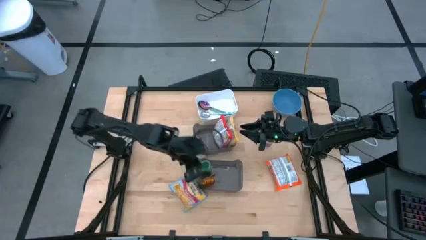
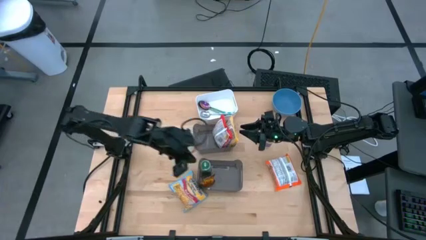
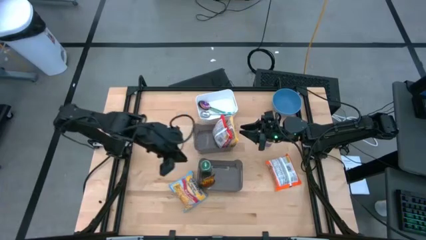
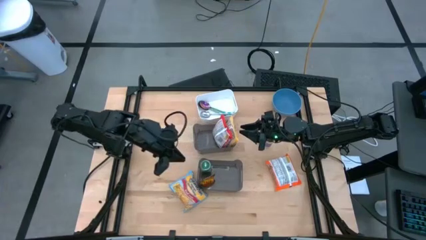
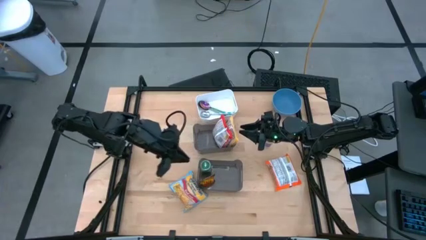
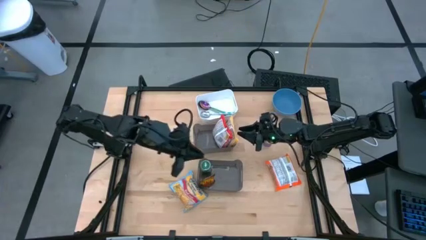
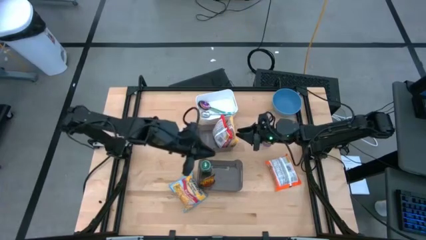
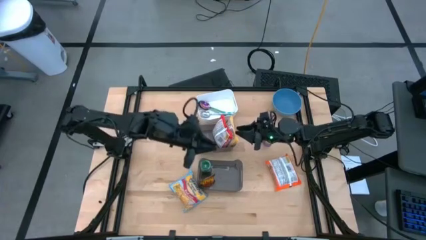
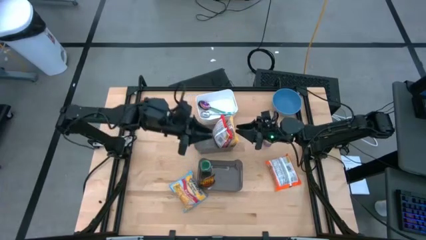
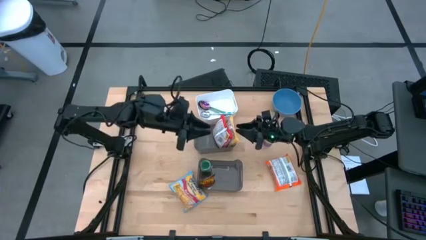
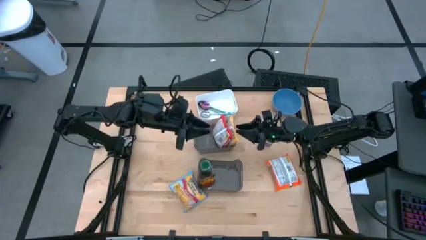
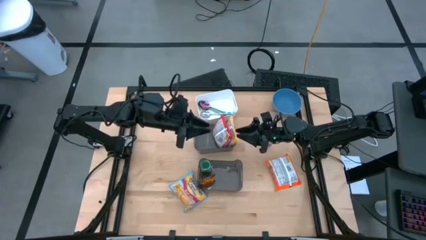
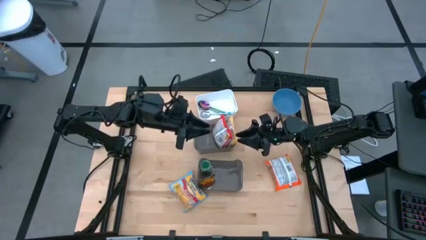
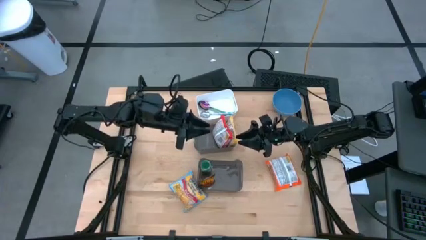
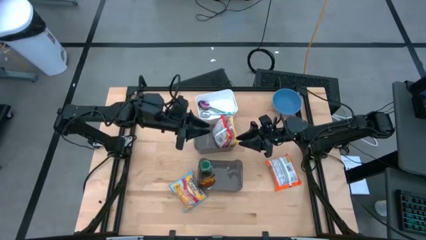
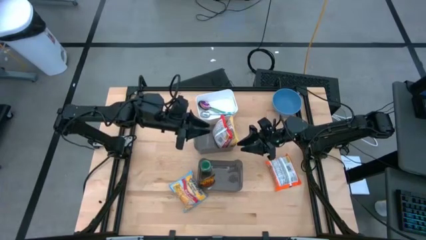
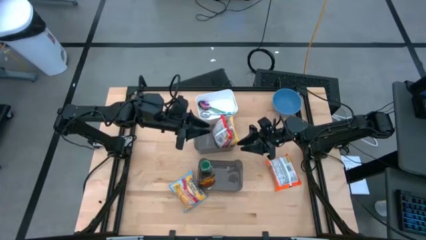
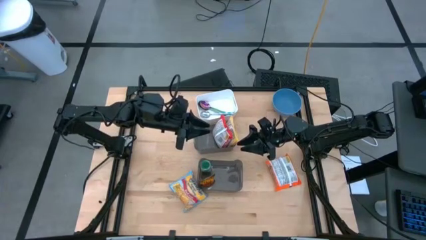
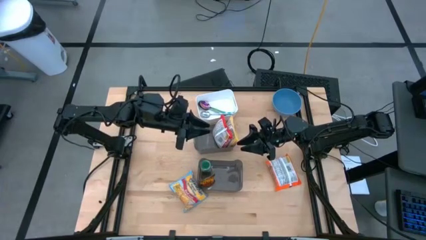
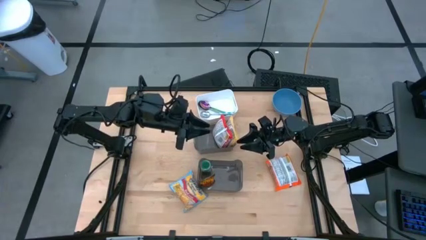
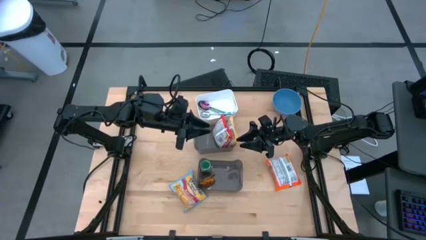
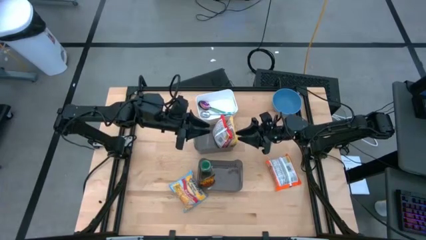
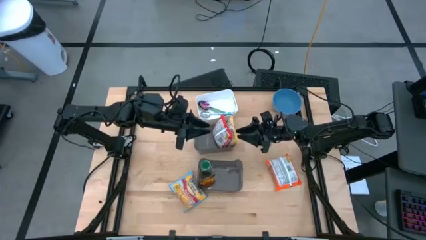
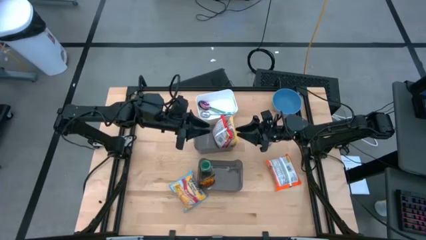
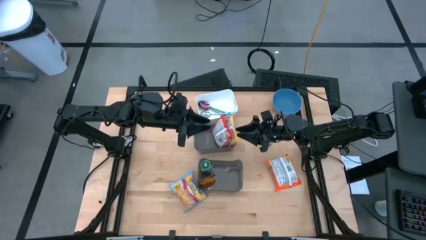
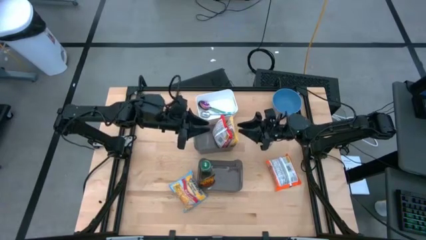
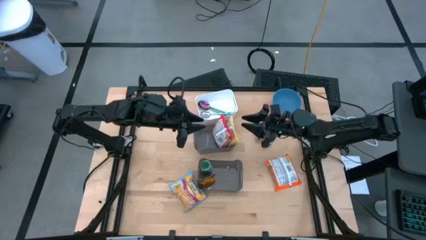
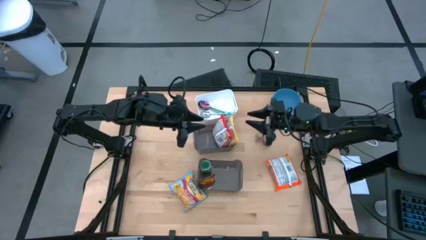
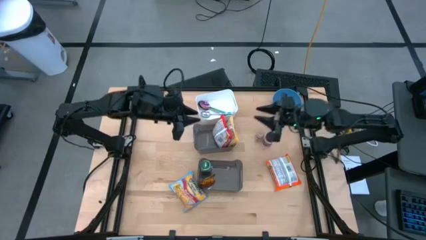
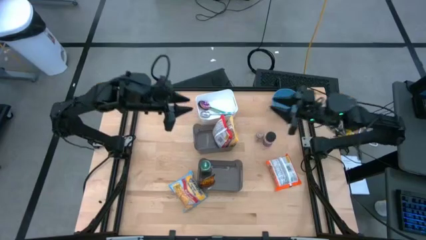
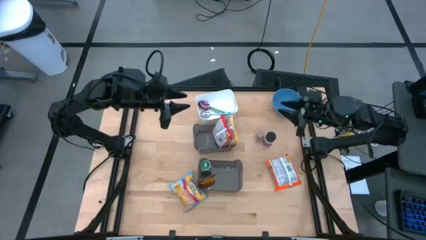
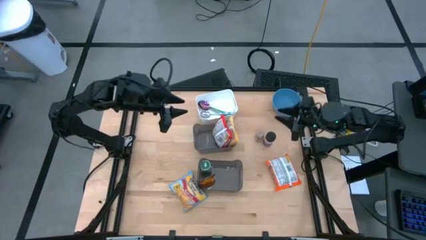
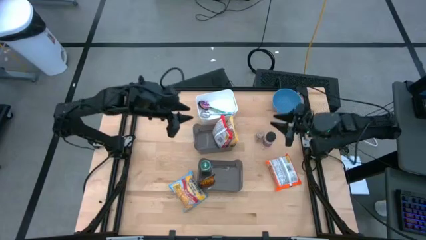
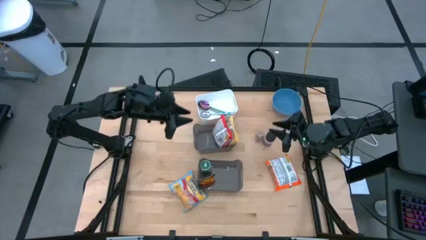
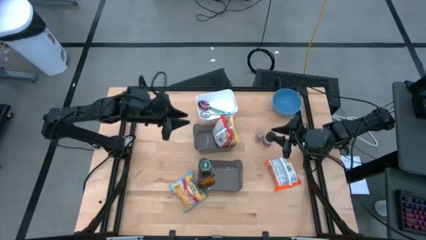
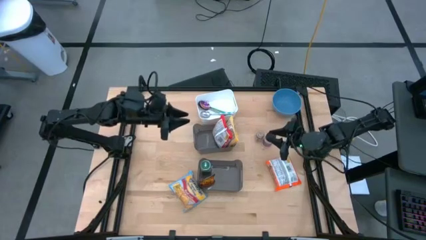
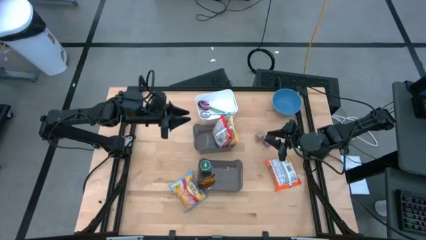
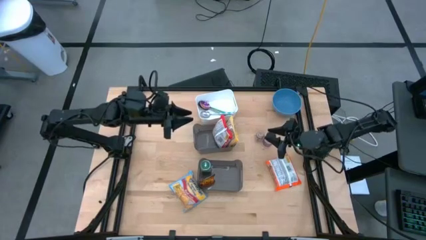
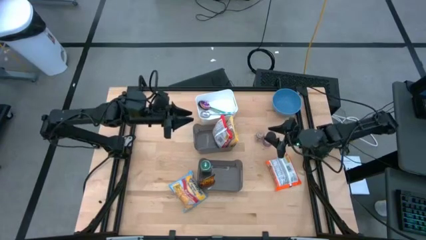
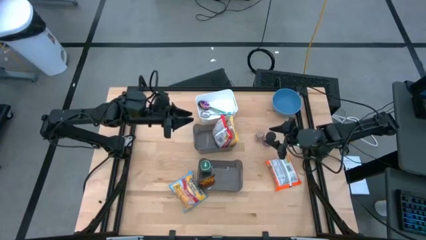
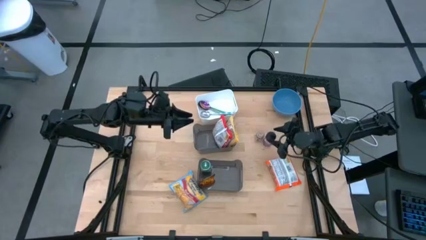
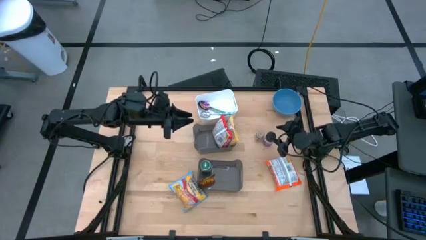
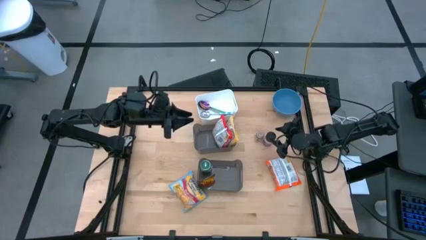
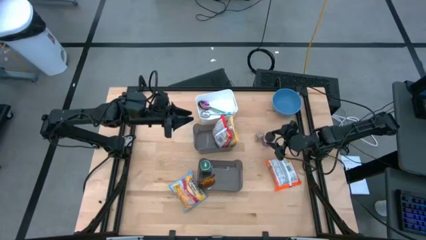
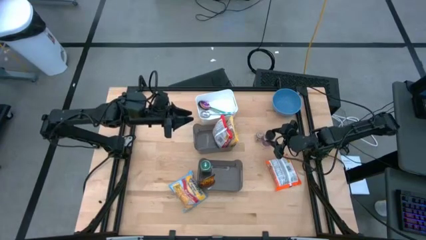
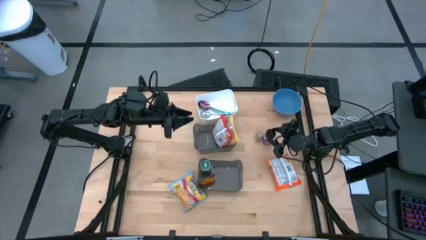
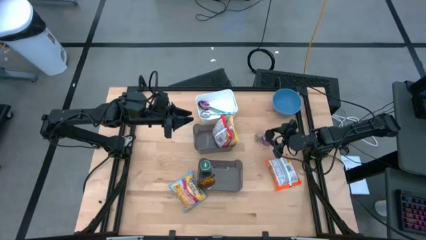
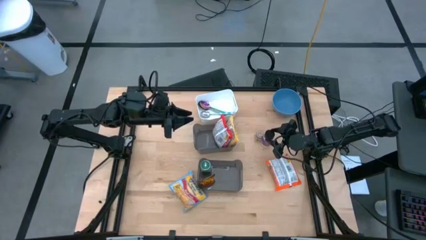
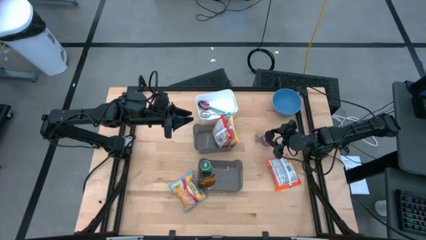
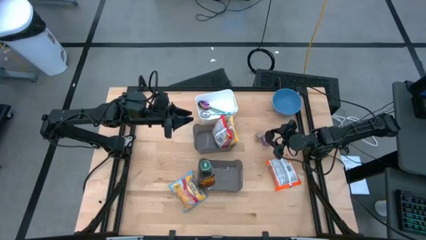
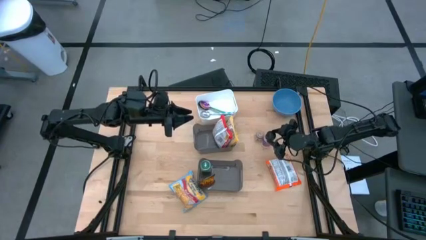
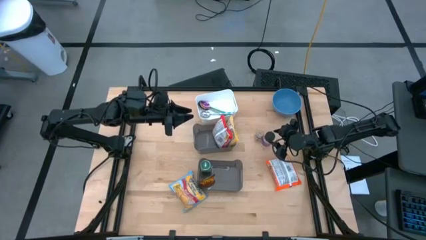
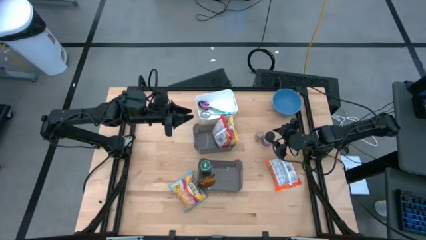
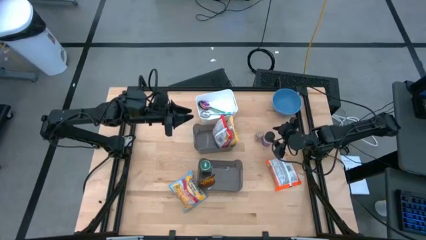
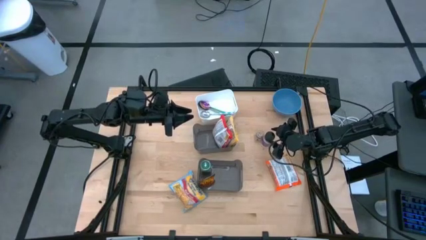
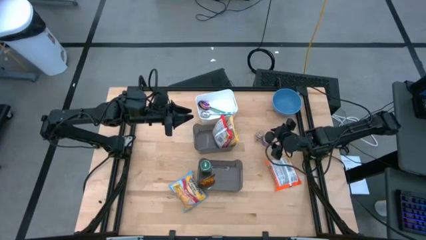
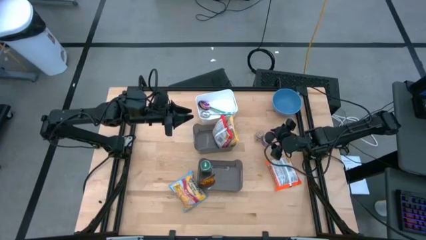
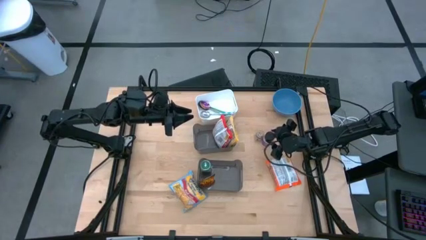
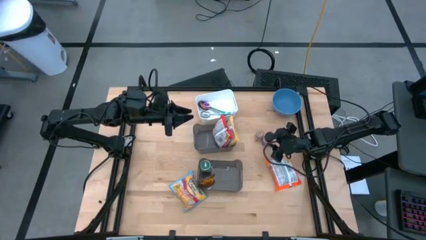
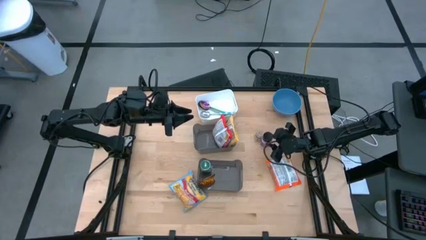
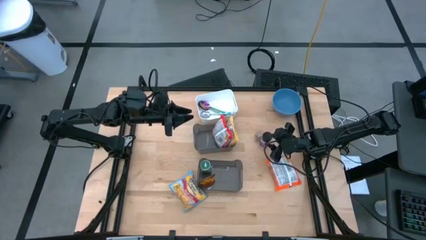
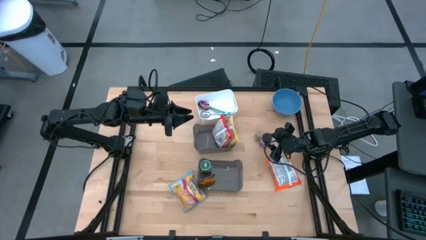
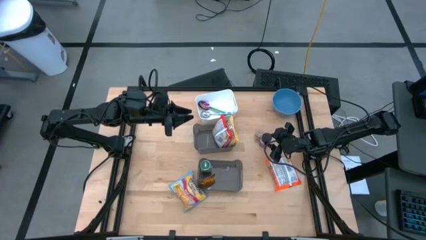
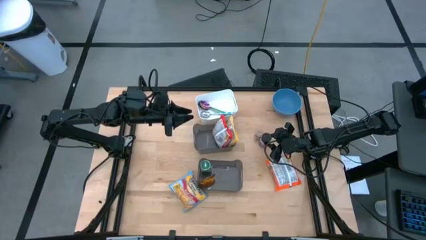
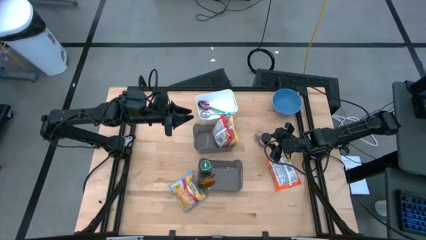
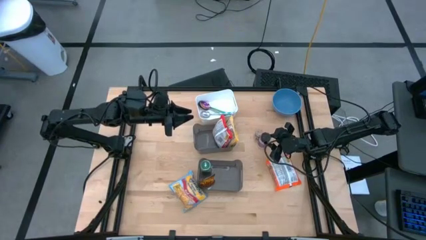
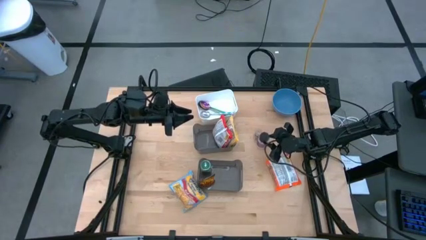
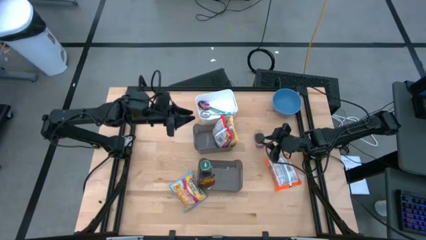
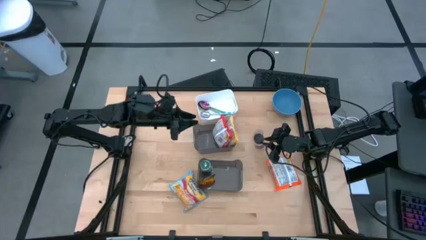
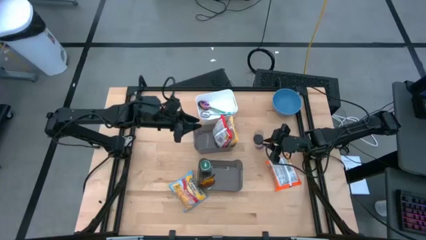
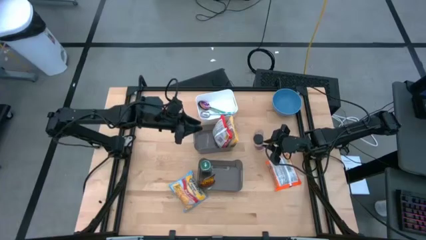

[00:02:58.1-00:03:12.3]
Task: Pick & Place Food Item
Put the black seasoning bottle into the bottom black bin
